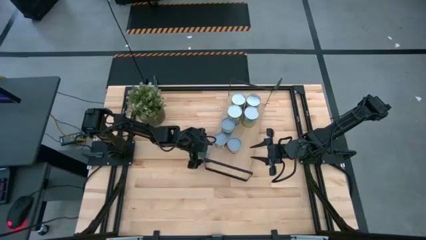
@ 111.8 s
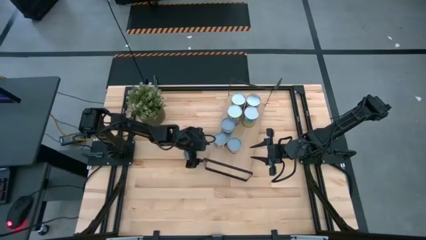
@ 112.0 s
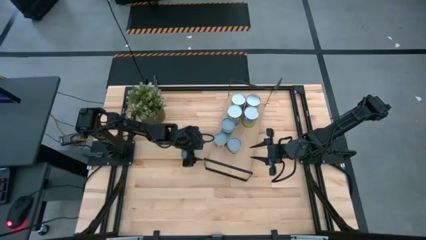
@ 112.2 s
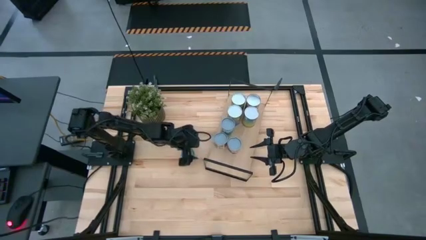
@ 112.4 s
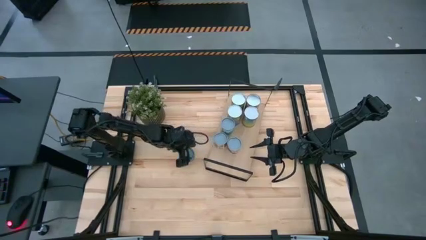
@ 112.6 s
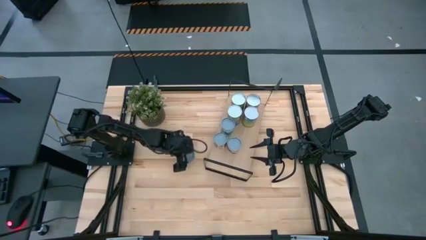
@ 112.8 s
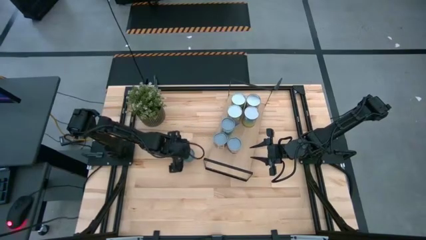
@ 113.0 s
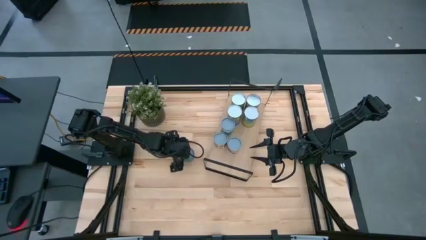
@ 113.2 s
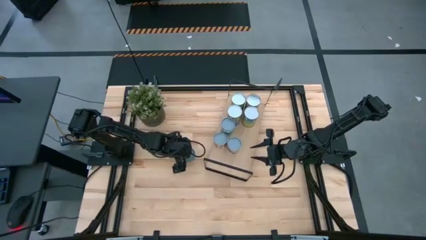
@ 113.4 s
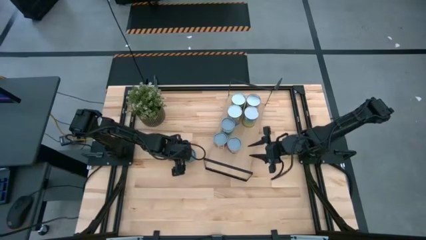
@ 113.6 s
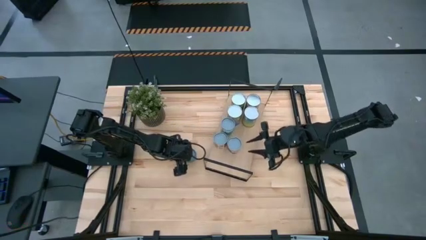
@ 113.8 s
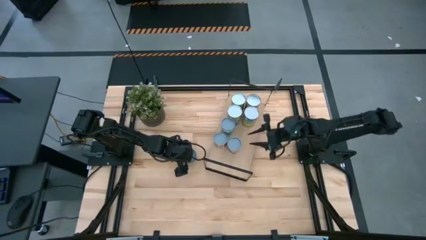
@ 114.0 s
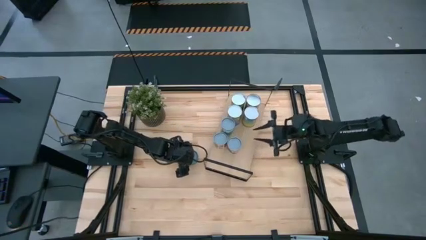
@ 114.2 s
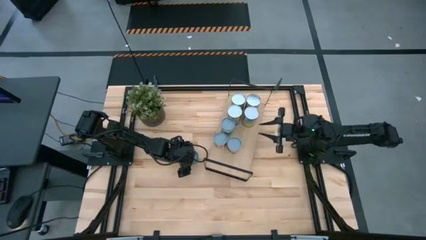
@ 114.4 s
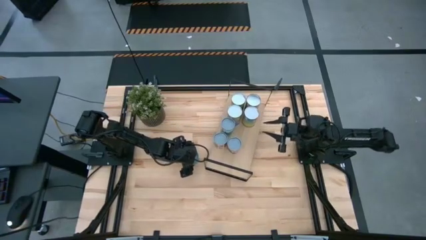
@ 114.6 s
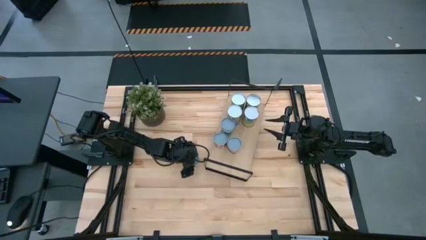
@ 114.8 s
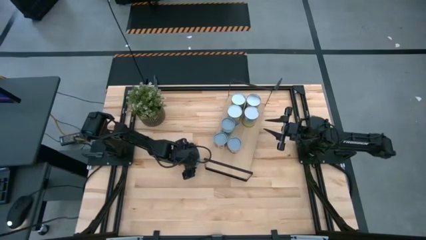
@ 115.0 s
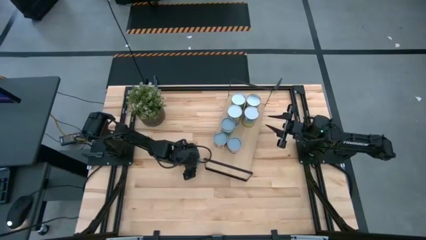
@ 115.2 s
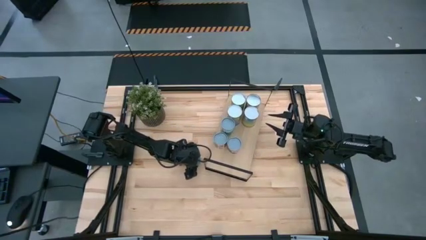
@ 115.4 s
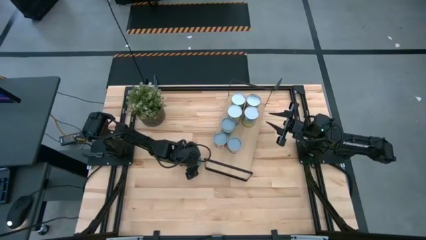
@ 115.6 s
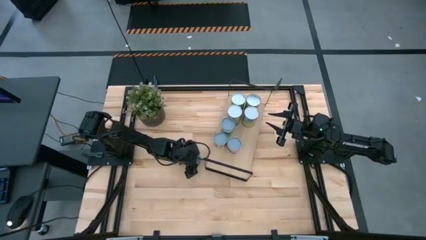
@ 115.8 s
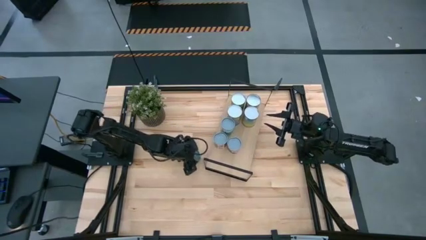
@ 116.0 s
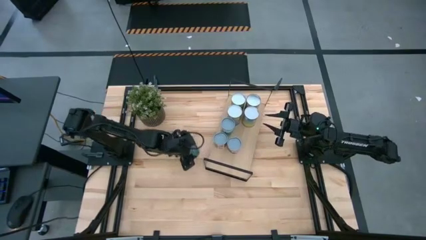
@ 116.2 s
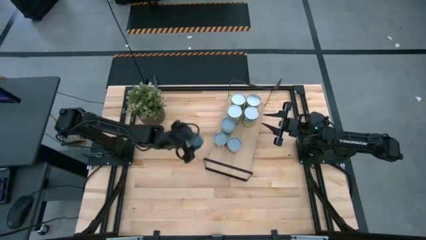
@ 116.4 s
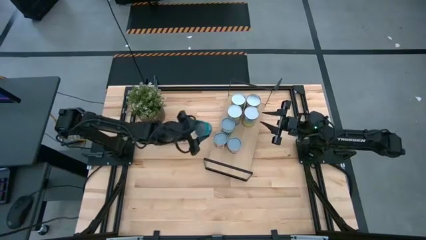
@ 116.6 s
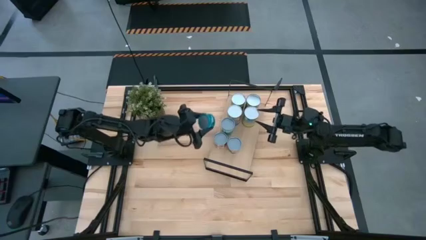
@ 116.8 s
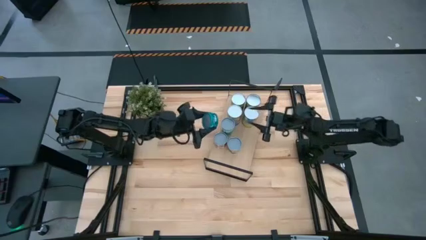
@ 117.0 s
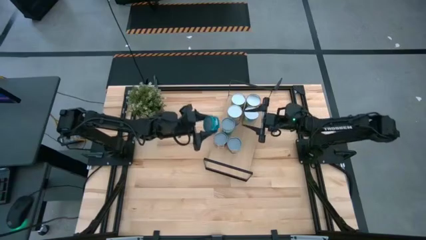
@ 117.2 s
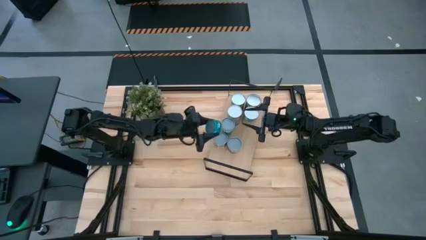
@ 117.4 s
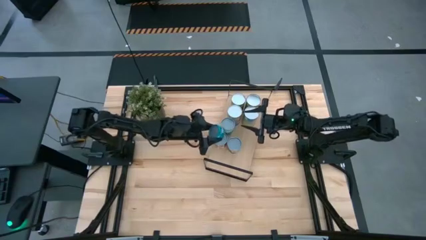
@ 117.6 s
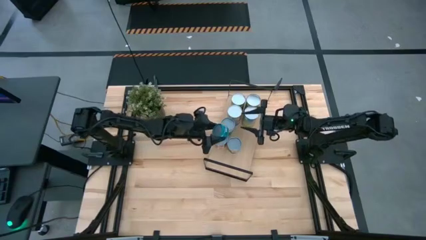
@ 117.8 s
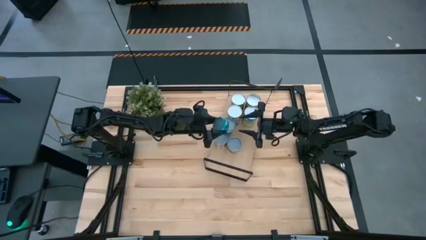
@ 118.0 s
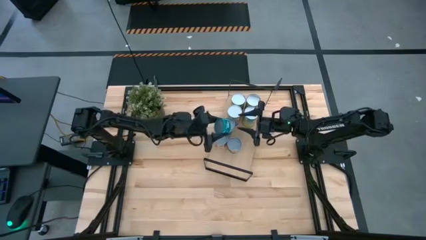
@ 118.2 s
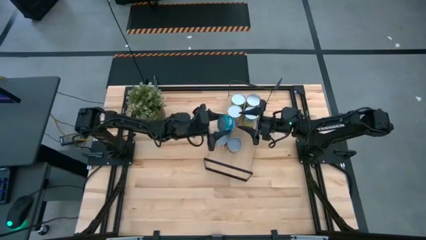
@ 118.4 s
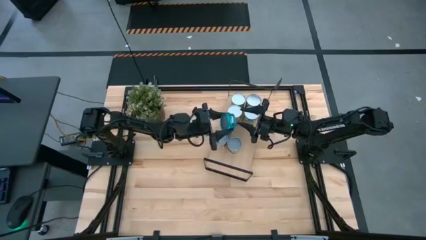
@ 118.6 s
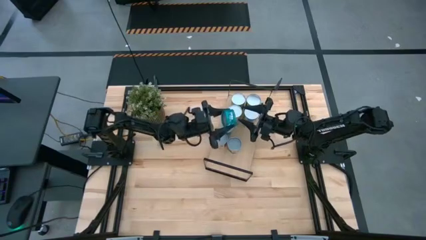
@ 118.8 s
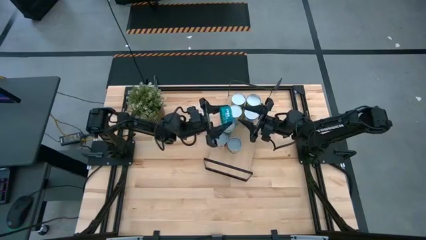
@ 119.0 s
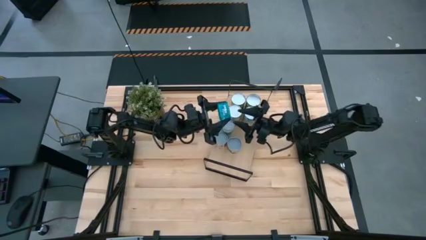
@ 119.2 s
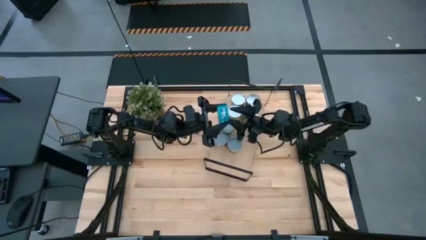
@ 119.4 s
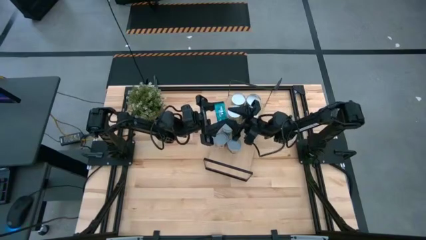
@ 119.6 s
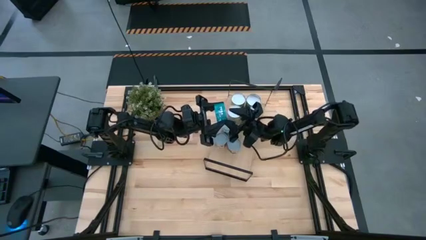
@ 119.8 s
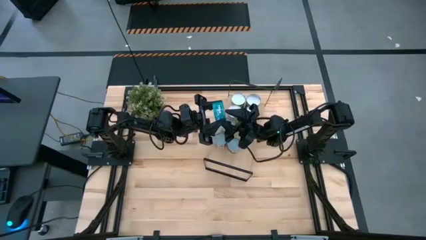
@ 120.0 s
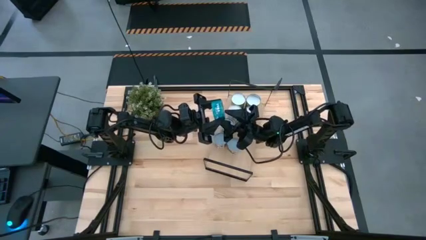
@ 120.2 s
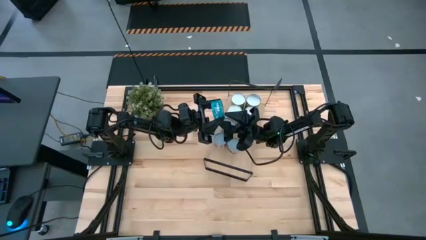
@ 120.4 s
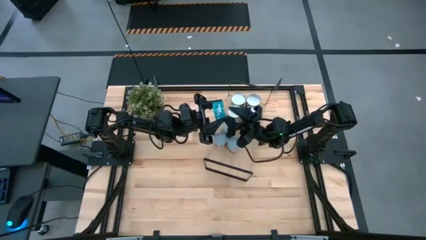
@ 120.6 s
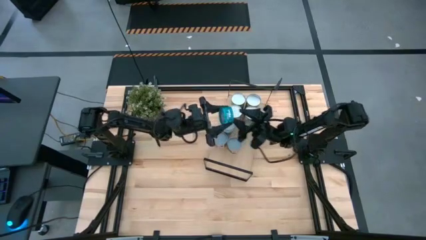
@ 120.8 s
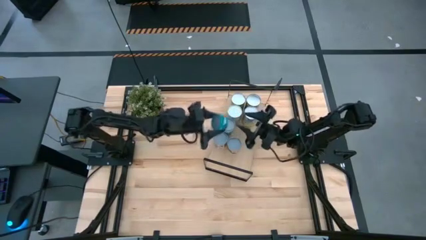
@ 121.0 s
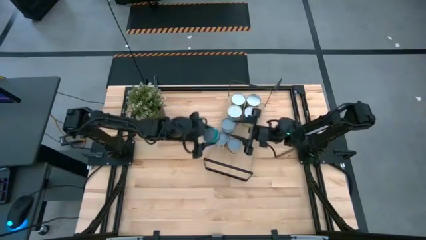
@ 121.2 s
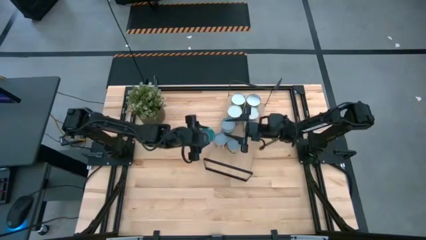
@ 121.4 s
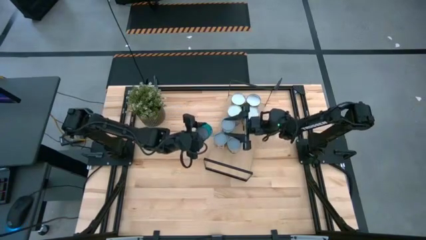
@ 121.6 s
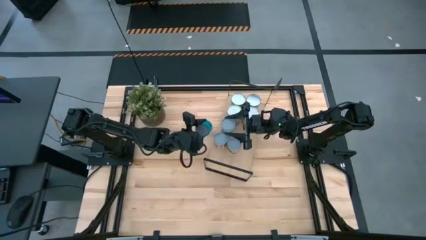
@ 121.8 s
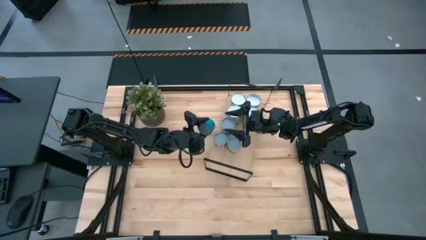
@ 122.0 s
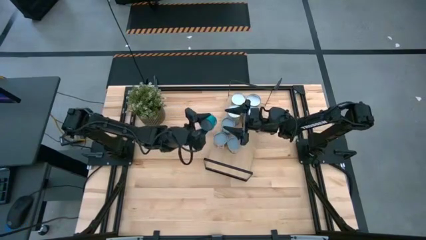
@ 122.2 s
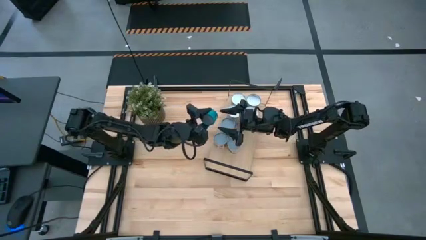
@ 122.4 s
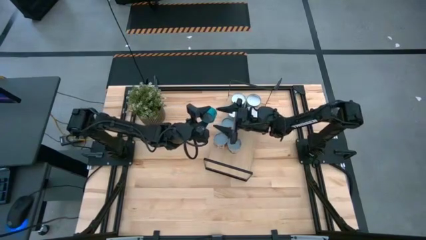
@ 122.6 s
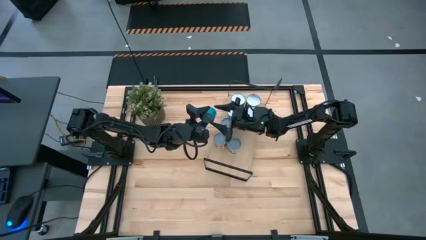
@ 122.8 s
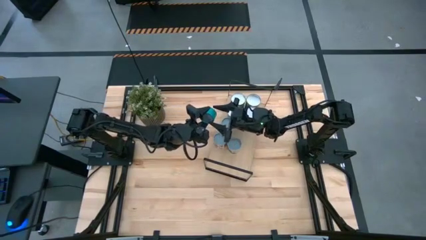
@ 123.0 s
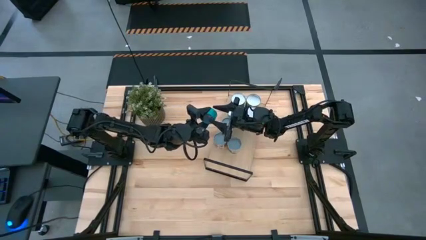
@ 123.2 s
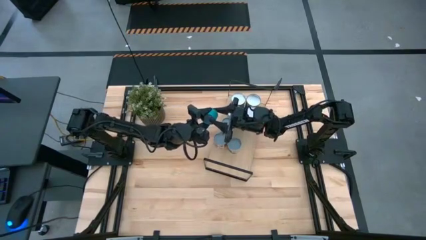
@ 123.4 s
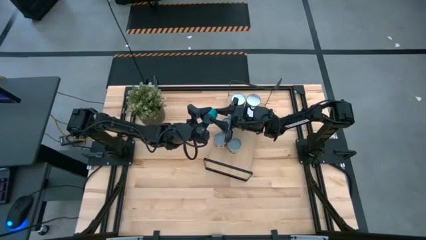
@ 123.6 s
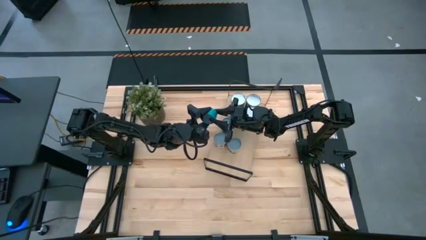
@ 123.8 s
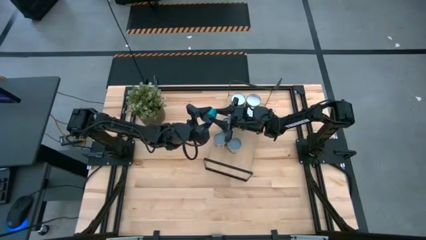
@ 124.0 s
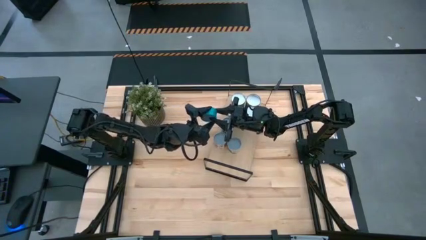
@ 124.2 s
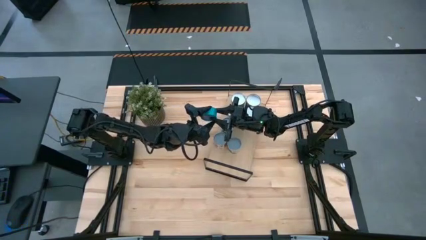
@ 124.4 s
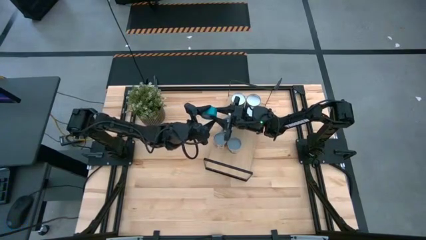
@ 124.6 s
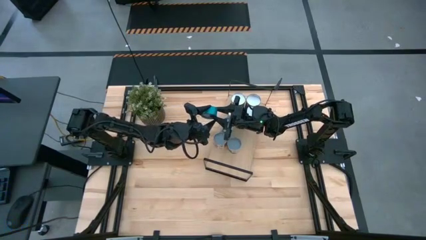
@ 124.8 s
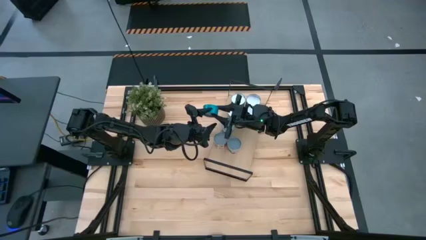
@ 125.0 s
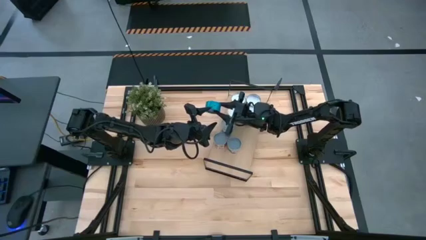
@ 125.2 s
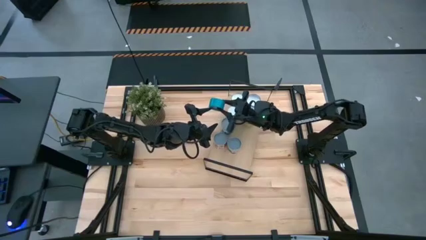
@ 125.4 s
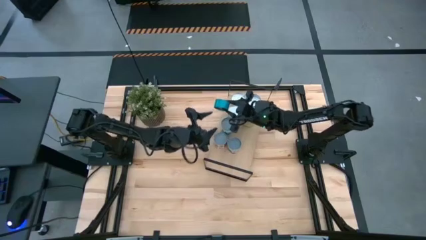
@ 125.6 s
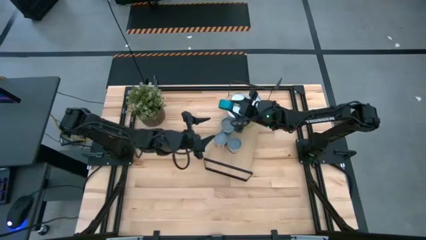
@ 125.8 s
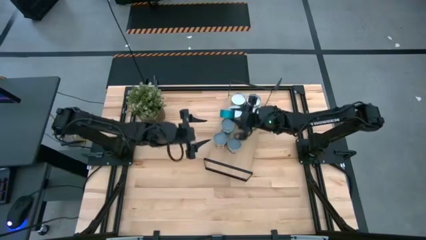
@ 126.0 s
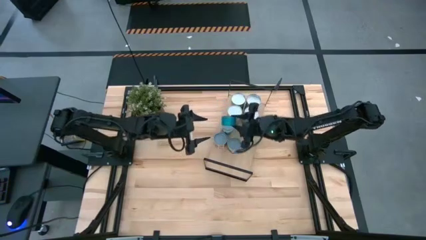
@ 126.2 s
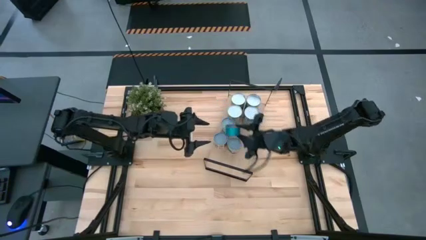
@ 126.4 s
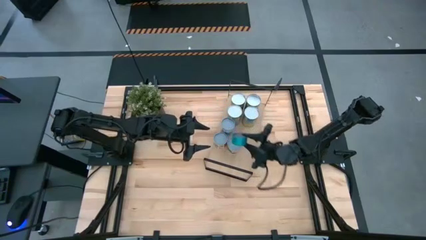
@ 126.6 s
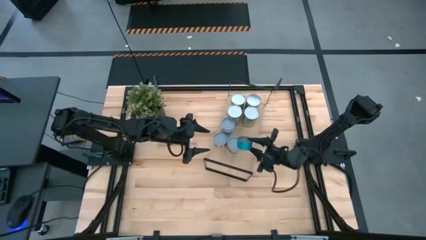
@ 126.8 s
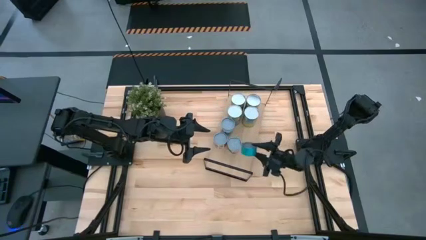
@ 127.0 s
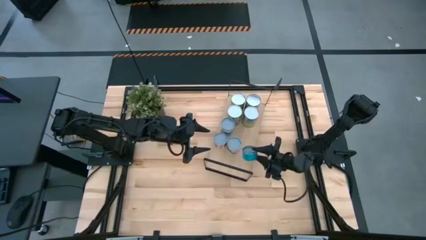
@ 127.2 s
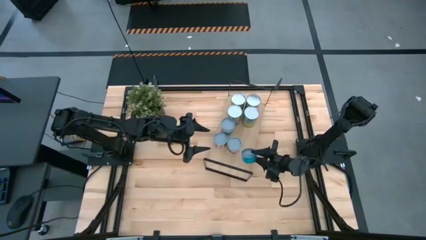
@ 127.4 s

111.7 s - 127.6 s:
Task: Pick and place cans onto a shelf
Put the canned tuna fish on the shelf
